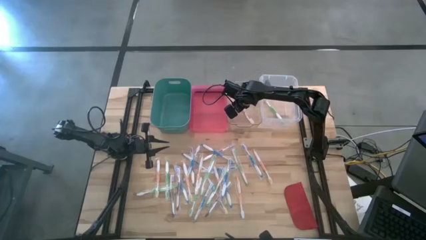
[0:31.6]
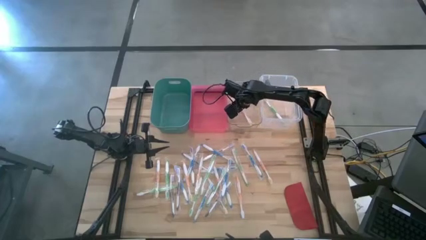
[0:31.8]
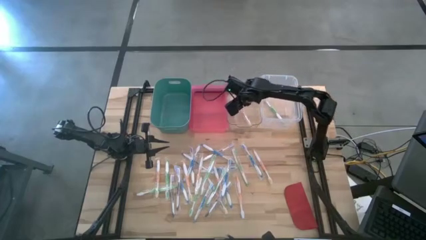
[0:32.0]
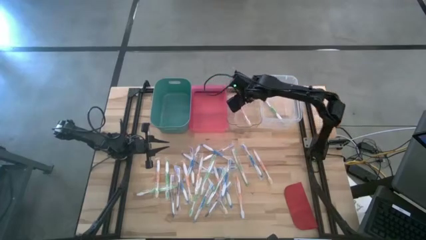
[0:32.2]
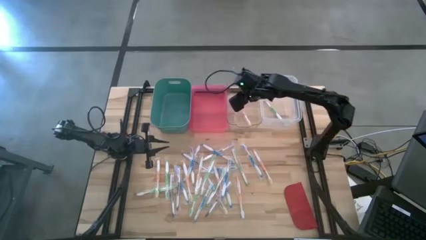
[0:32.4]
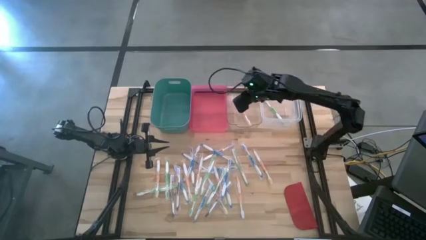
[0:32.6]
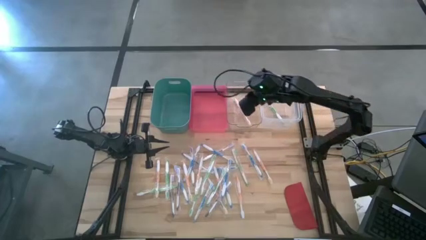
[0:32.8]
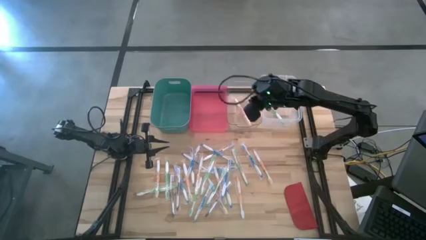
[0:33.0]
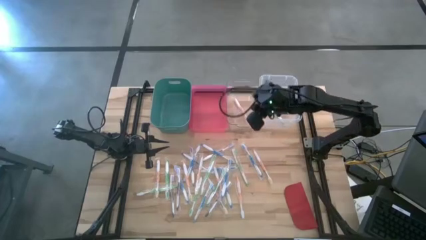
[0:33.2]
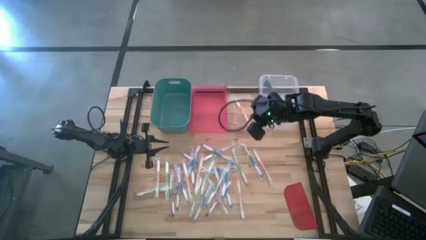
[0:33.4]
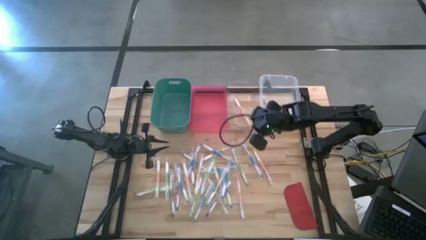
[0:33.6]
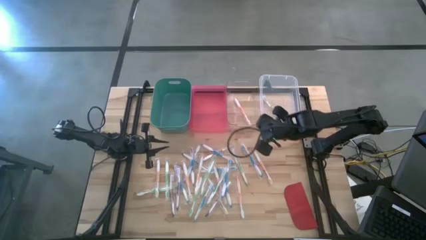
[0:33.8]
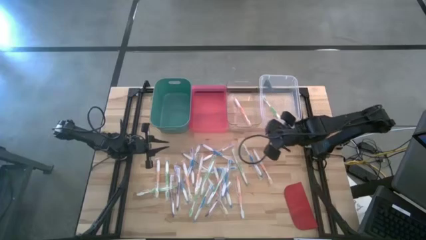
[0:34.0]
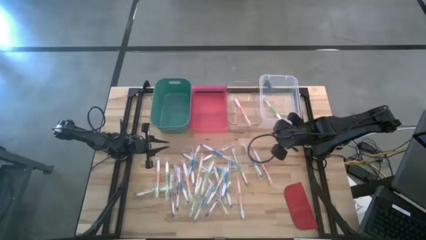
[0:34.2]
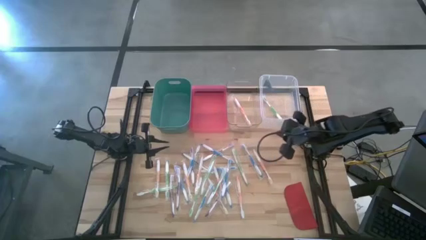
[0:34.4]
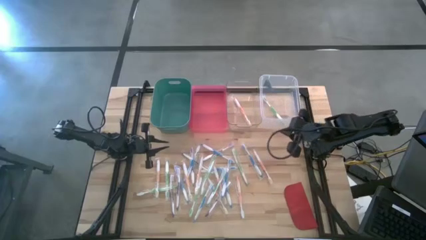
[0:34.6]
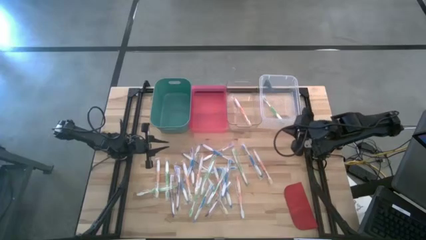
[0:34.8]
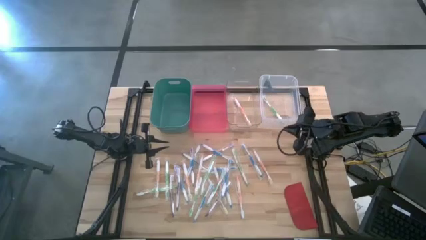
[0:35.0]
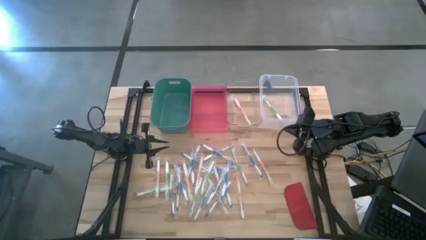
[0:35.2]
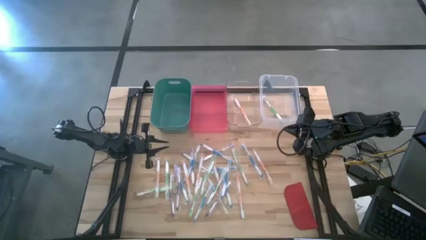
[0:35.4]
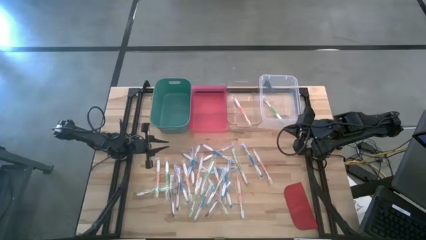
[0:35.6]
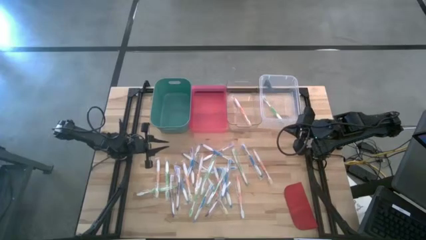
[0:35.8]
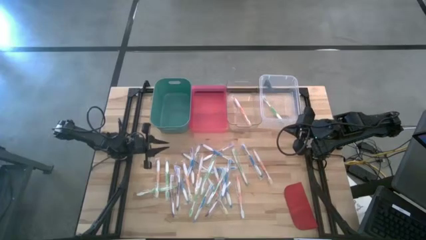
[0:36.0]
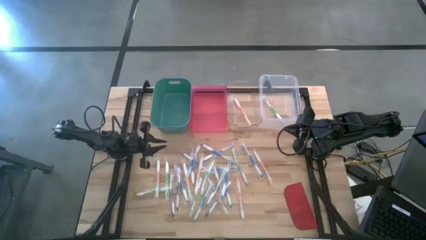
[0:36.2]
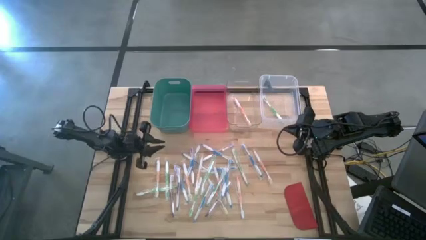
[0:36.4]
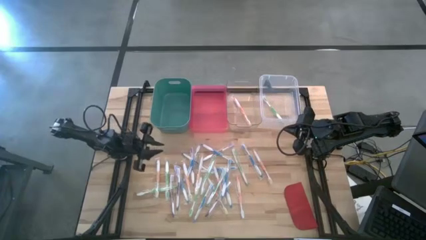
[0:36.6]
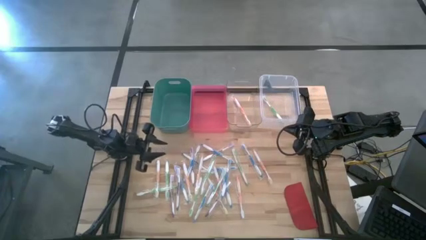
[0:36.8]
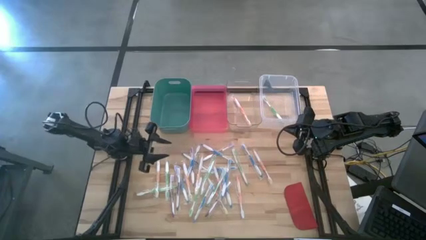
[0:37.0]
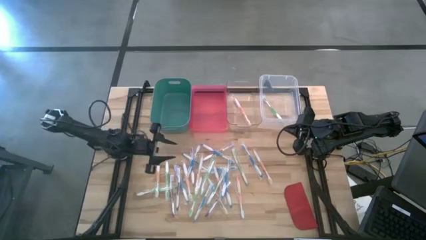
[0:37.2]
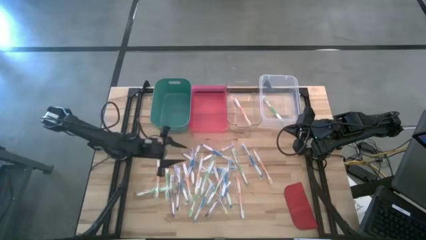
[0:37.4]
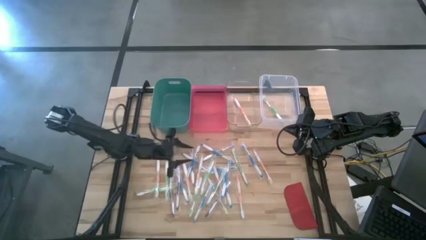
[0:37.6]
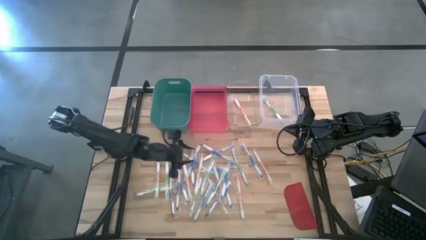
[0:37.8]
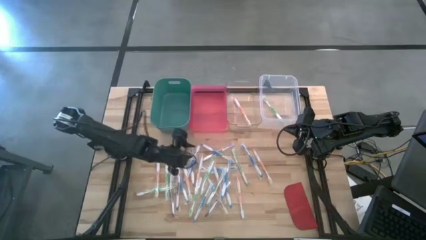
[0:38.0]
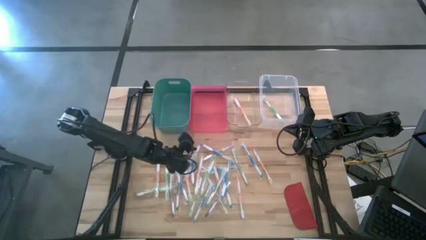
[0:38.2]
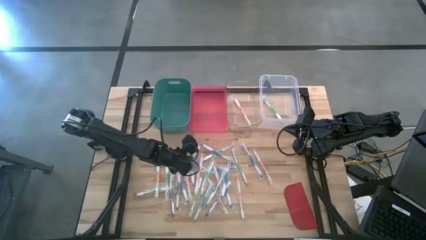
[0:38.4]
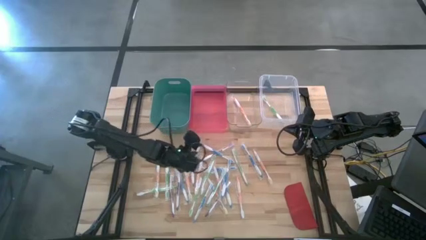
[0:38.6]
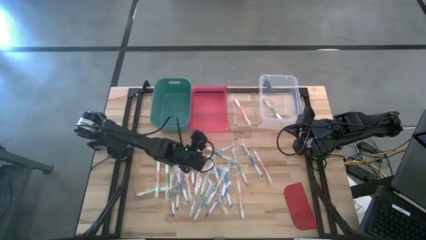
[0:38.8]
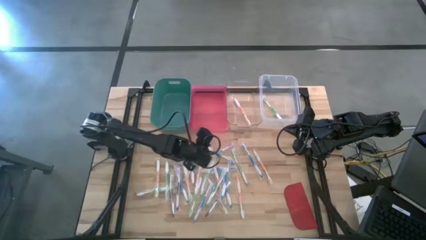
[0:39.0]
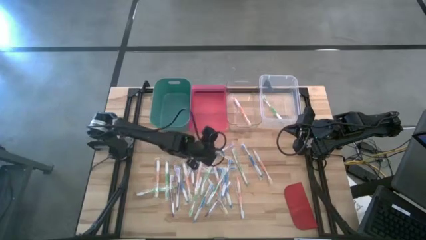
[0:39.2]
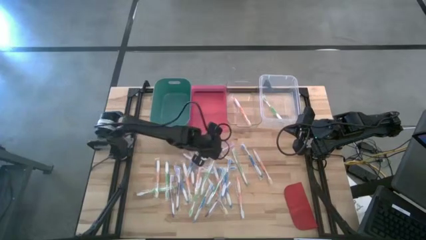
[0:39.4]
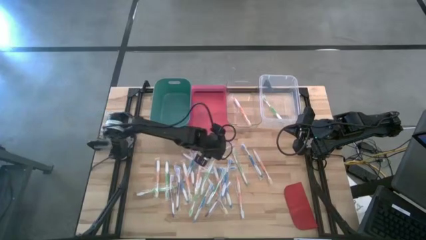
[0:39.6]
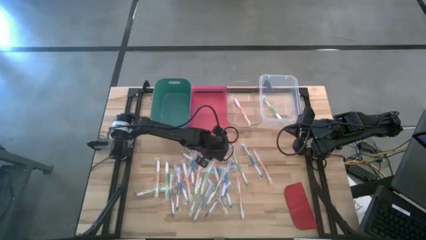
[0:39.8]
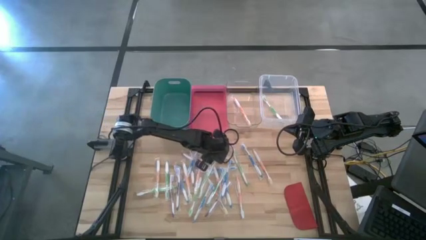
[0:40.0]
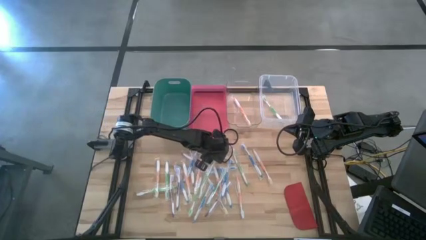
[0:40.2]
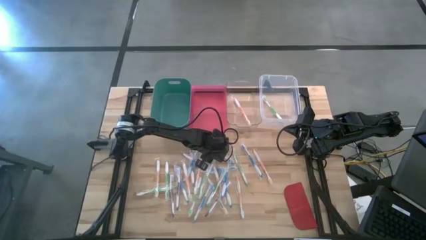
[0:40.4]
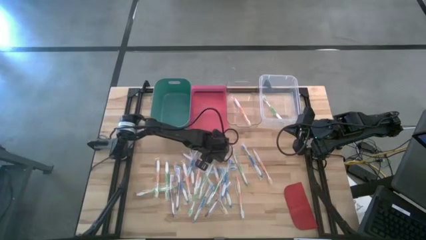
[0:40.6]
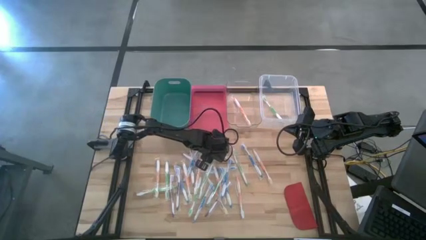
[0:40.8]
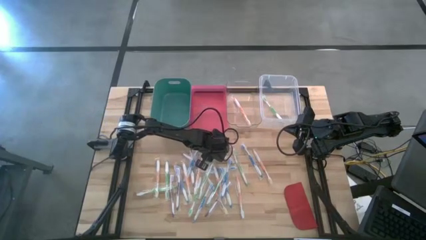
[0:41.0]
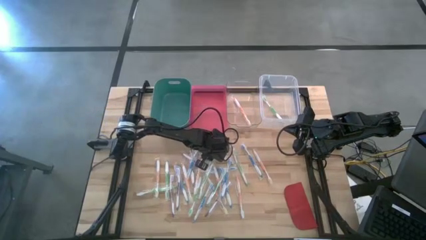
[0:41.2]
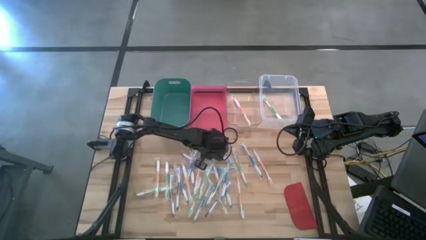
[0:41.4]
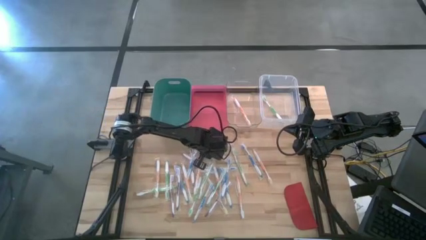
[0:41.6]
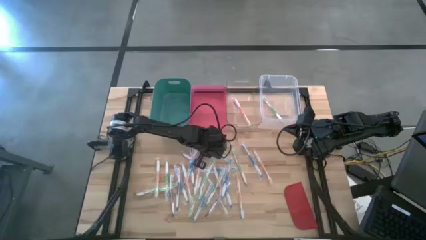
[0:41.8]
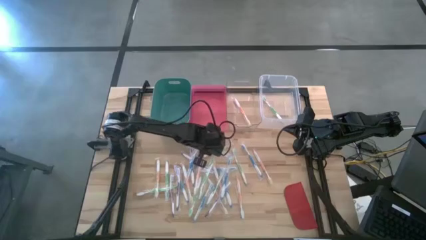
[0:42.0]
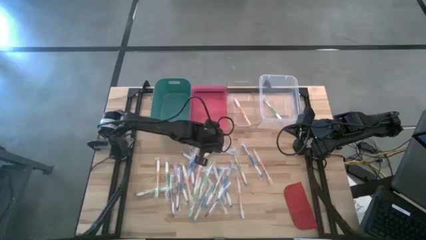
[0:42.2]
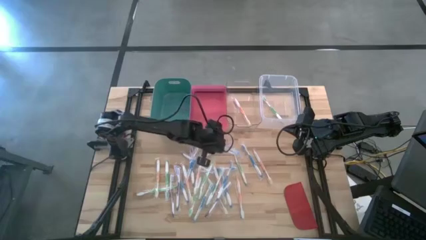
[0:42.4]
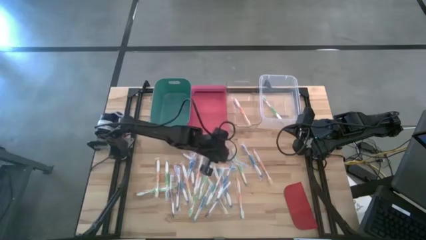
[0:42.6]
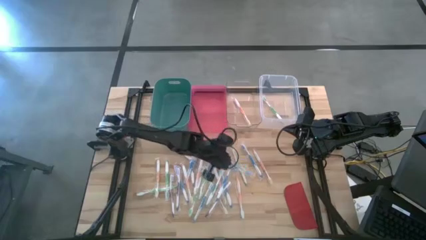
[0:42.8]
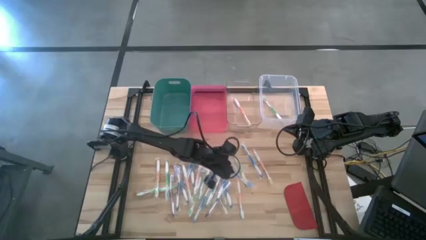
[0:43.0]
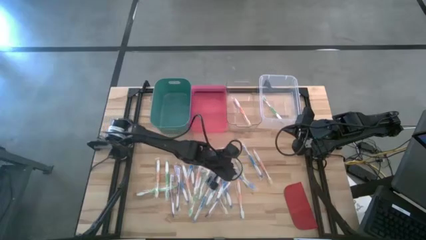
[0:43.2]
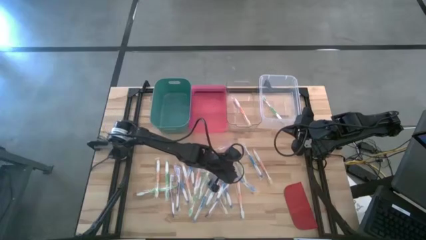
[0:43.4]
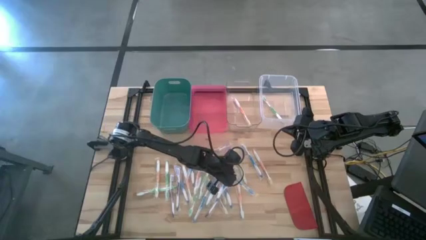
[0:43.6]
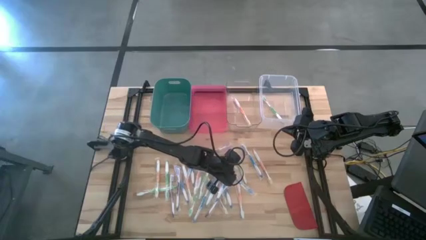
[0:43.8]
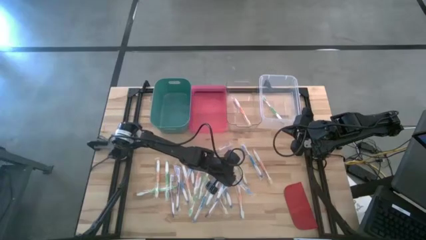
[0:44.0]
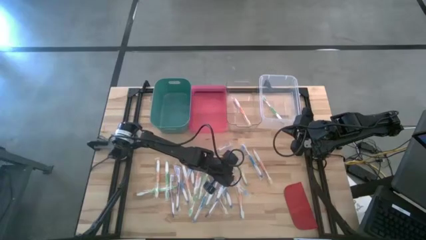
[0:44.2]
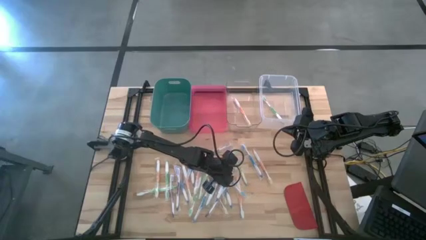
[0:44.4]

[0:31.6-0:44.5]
Task: Pick & Place Toothbrushes
Adjust the blue toothbrush on the table
